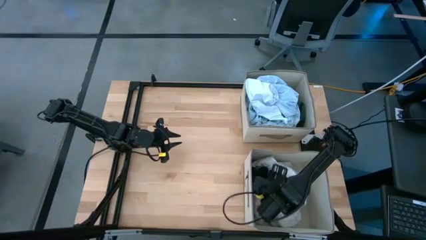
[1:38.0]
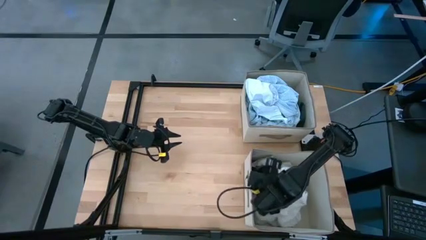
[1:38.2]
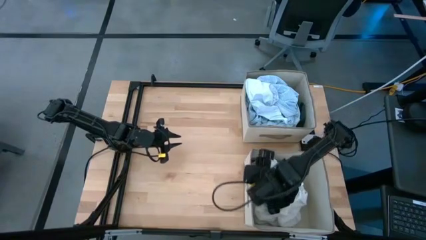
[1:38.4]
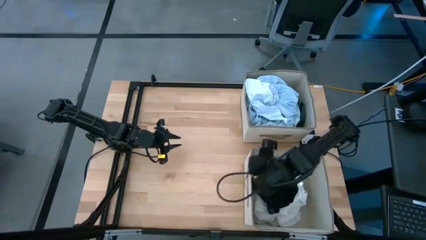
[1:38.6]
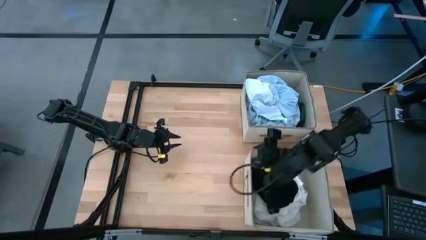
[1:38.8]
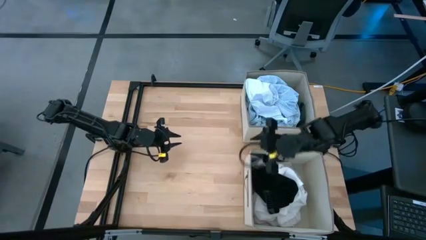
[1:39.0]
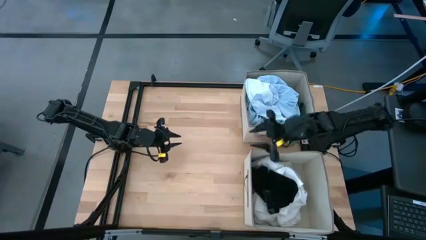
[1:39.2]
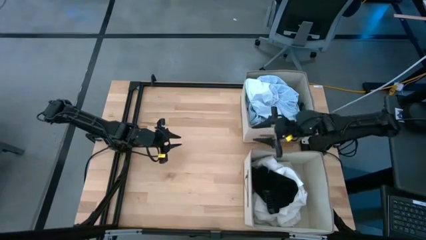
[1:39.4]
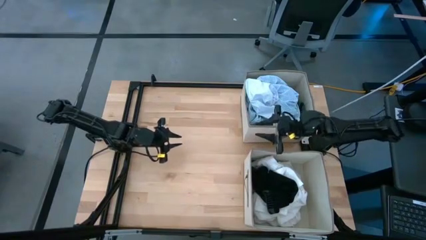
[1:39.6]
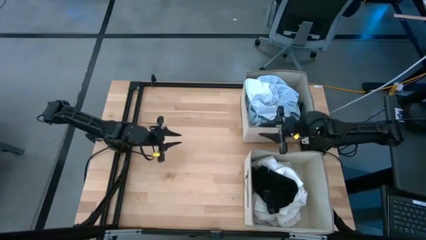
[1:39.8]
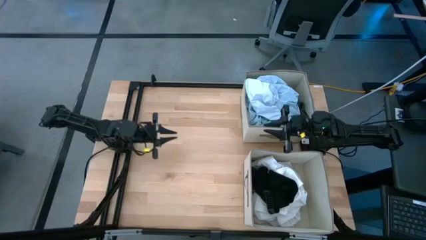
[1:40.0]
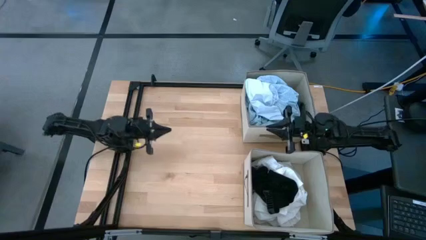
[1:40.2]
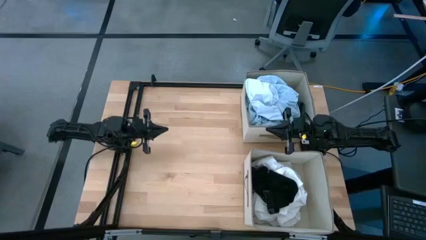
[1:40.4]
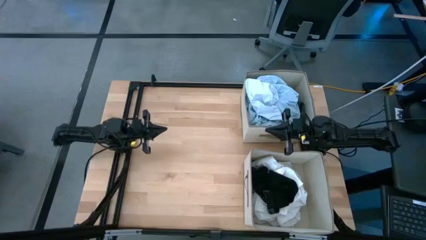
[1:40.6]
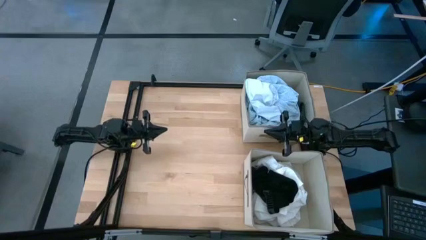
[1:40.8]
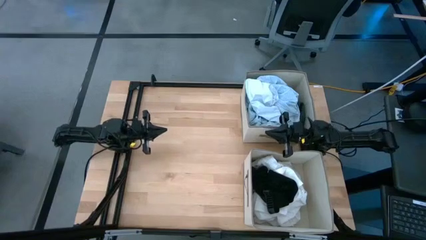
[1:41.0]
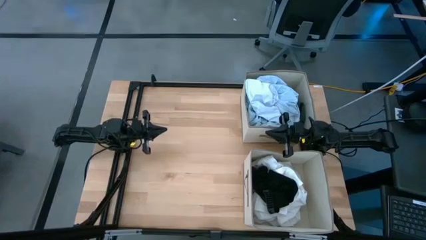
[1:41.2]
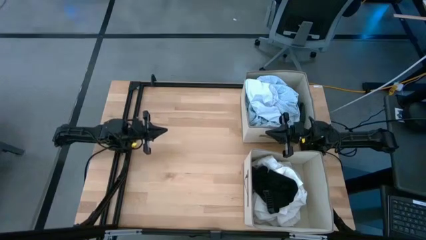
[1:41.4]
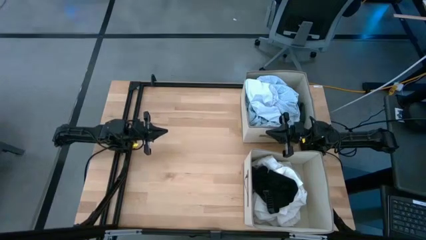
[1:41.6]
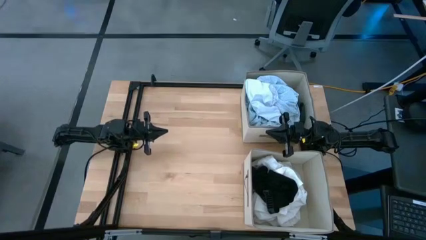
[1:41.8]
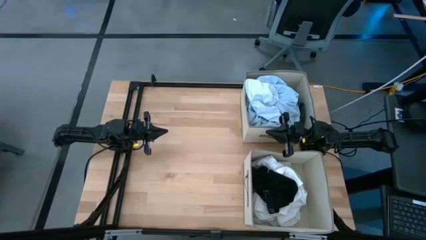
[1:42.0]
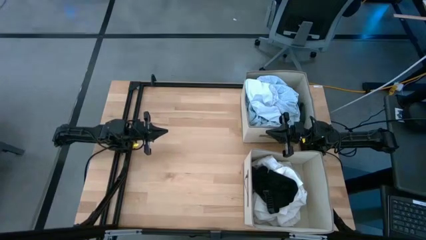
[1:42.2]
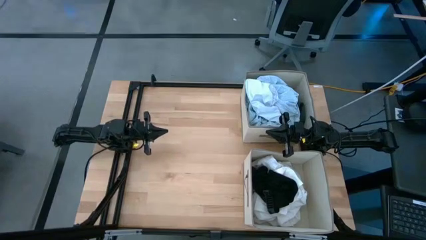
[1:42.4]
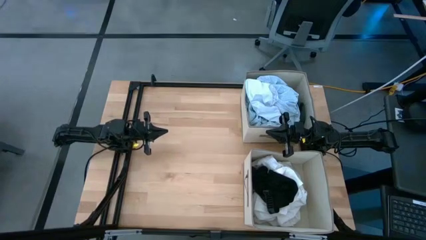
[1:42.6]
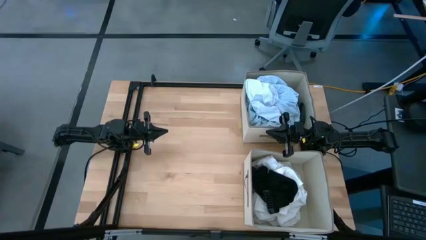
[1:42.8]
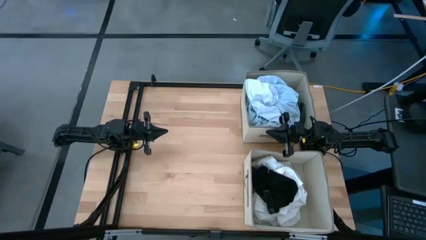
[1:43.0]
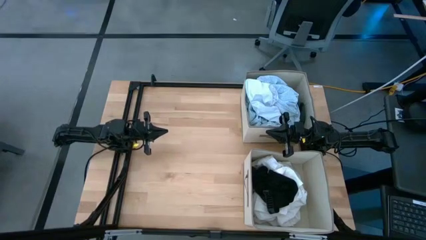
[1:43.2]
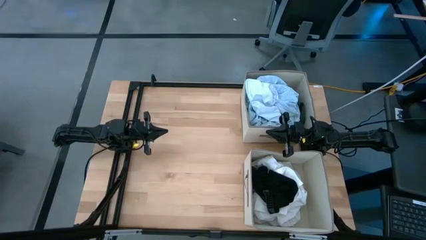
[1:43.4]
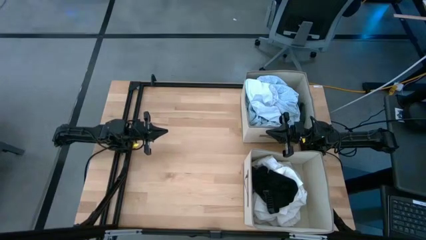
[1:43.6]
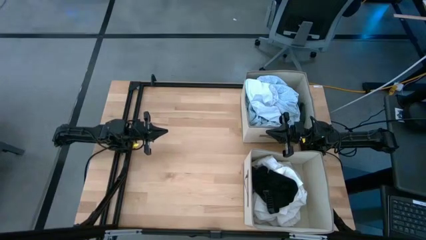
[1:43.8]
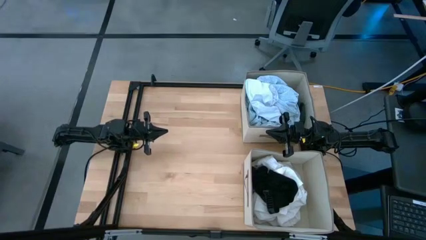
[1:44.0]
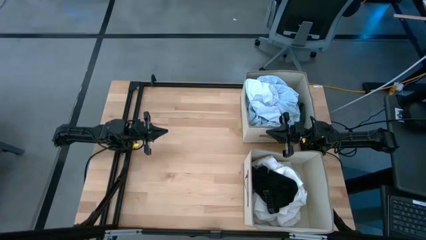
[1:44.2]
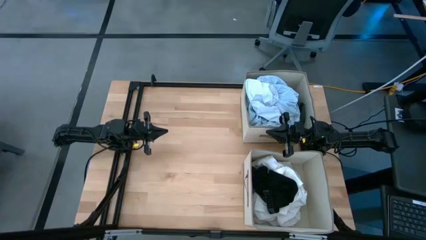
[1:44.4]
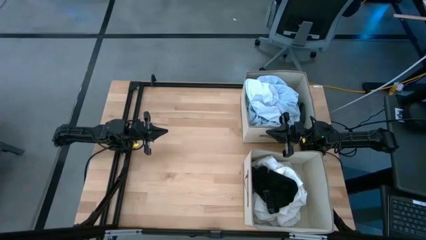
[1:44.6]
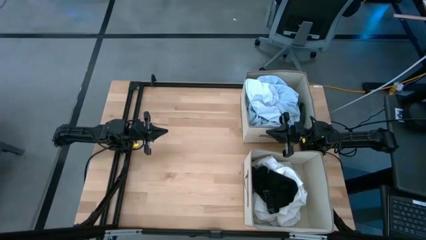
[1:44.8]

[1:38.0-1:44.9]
Task: Sort clothes
Return To Home Position

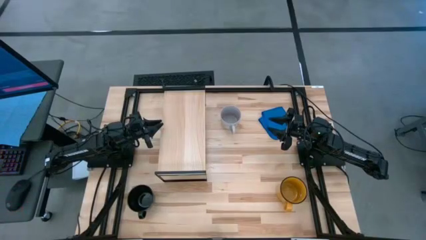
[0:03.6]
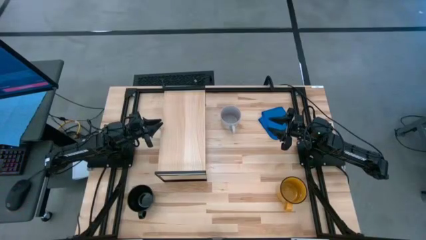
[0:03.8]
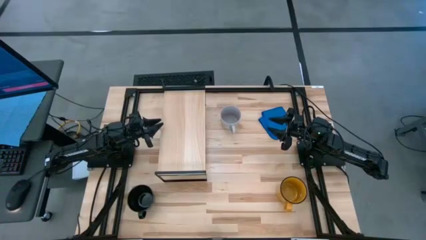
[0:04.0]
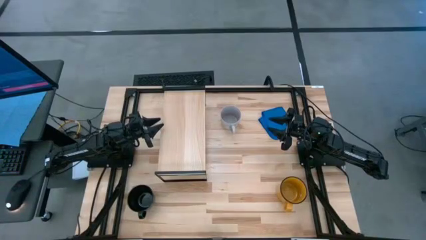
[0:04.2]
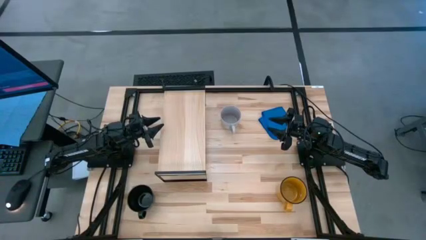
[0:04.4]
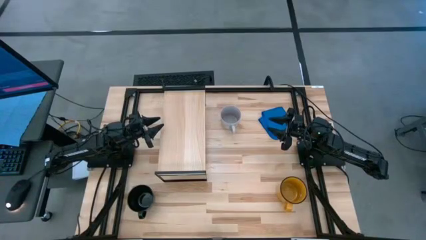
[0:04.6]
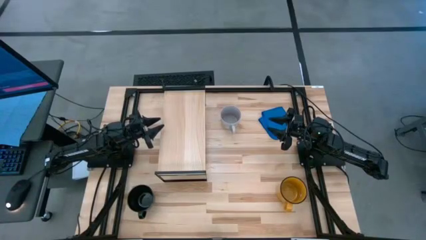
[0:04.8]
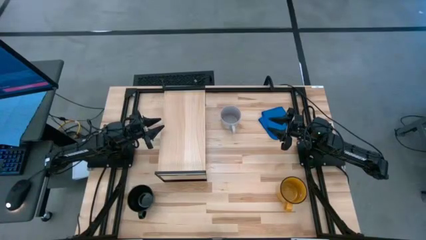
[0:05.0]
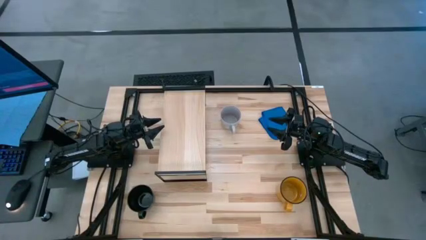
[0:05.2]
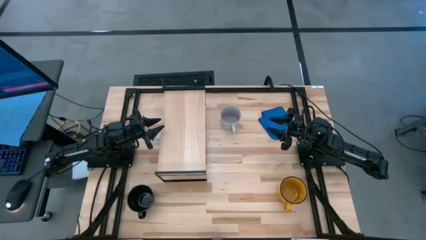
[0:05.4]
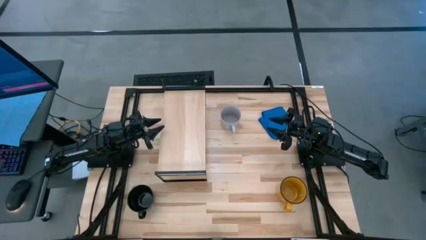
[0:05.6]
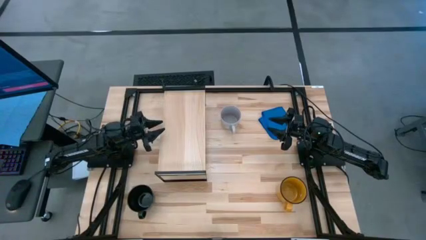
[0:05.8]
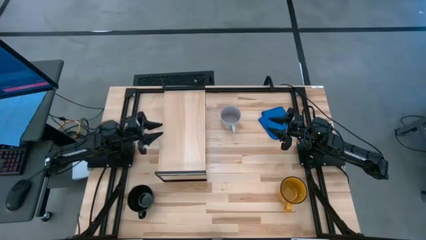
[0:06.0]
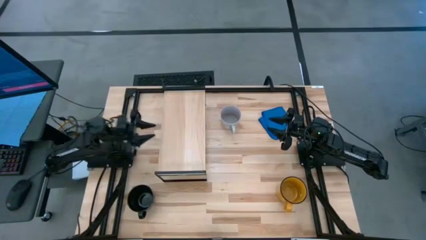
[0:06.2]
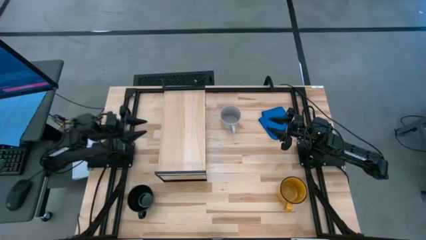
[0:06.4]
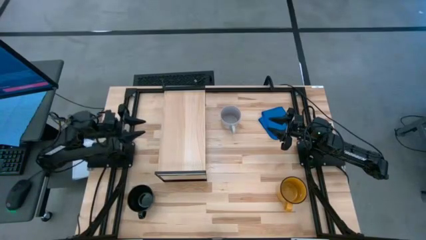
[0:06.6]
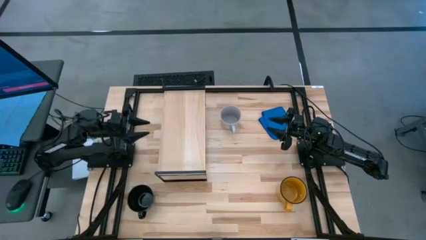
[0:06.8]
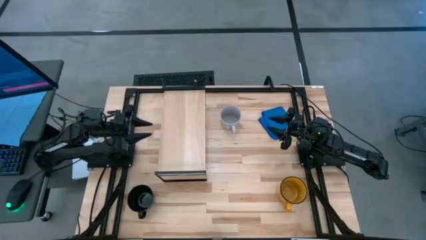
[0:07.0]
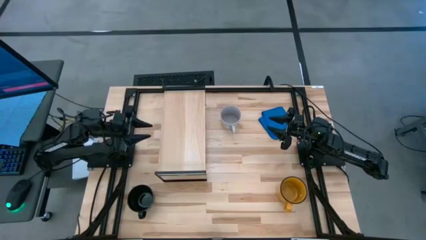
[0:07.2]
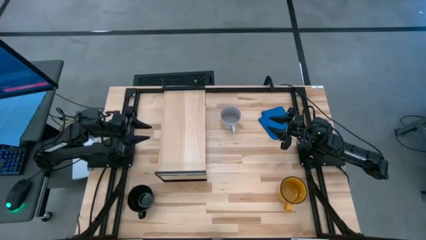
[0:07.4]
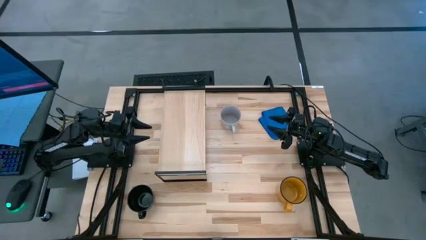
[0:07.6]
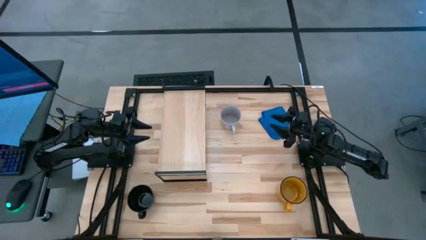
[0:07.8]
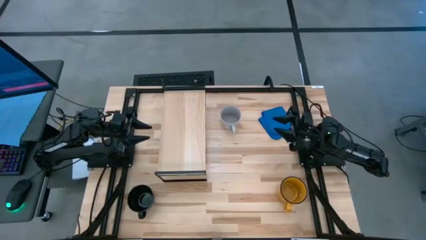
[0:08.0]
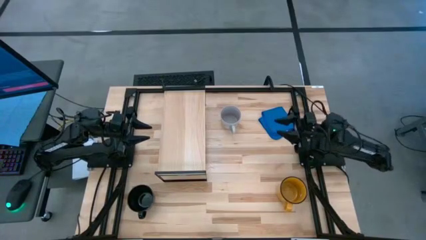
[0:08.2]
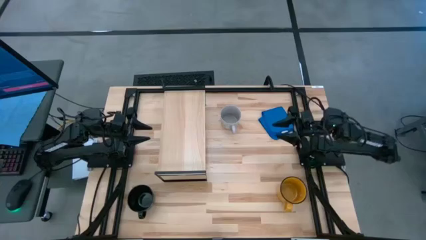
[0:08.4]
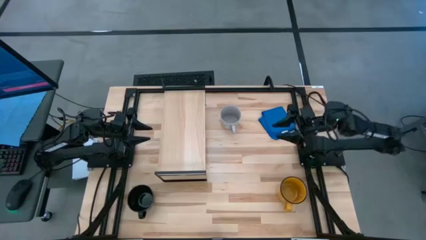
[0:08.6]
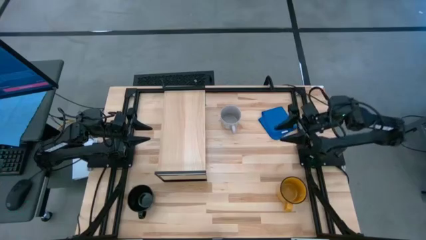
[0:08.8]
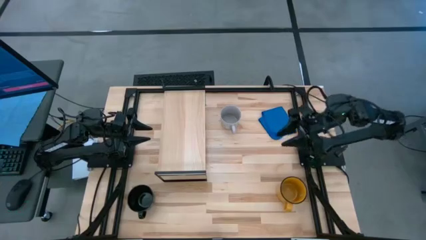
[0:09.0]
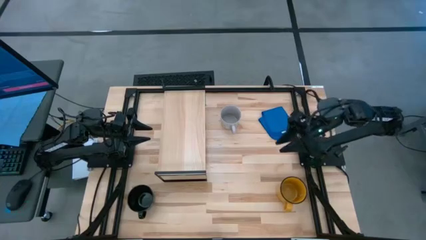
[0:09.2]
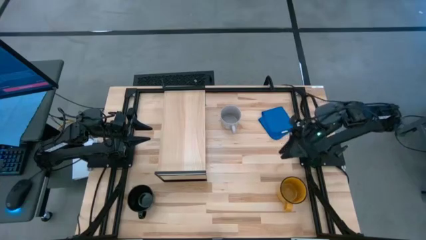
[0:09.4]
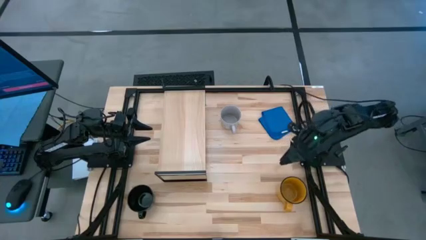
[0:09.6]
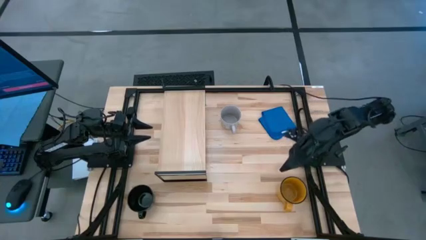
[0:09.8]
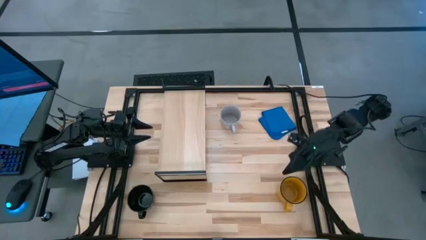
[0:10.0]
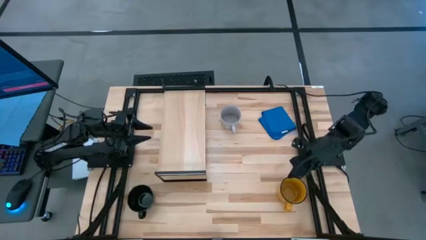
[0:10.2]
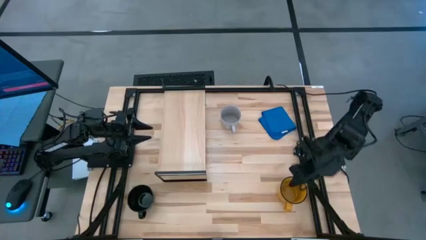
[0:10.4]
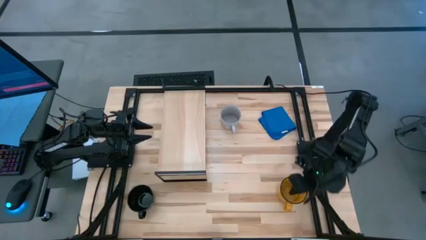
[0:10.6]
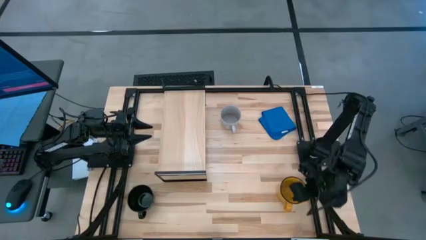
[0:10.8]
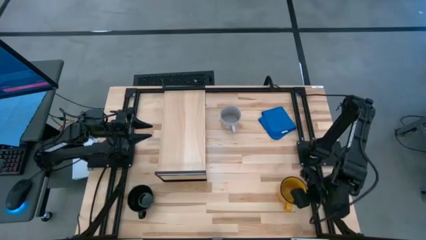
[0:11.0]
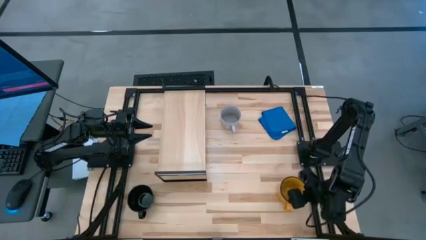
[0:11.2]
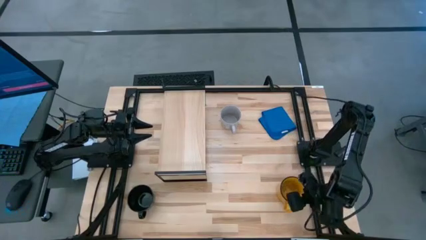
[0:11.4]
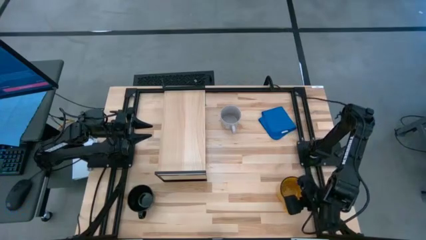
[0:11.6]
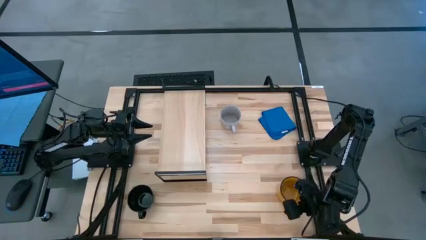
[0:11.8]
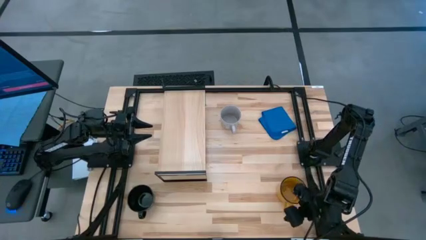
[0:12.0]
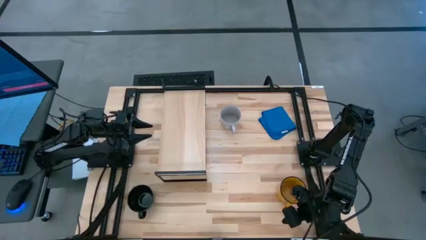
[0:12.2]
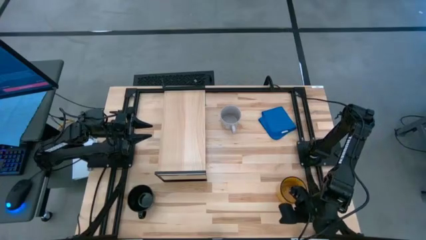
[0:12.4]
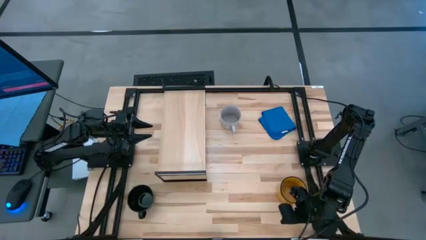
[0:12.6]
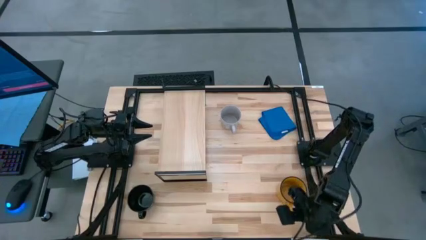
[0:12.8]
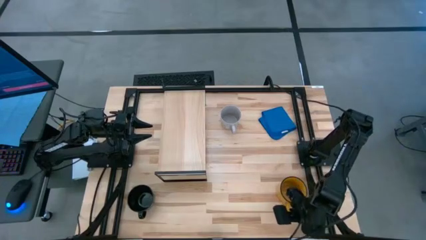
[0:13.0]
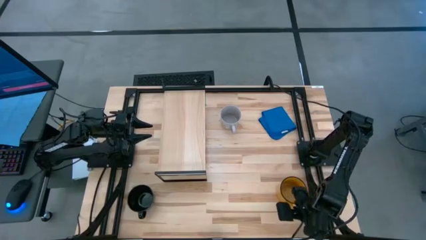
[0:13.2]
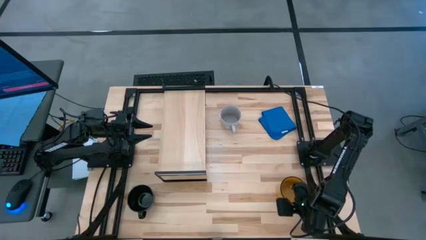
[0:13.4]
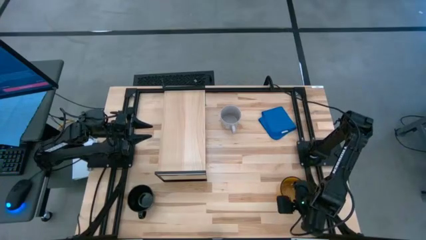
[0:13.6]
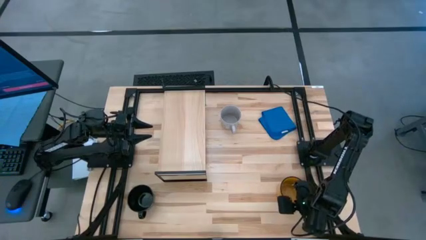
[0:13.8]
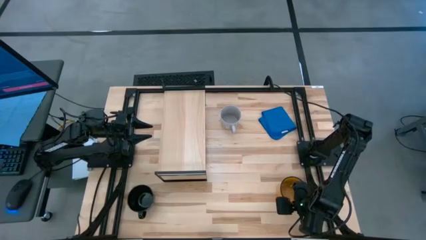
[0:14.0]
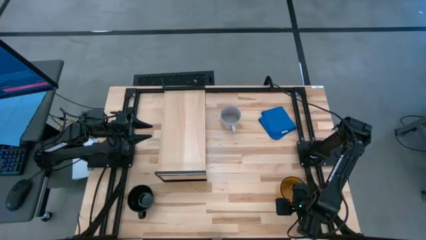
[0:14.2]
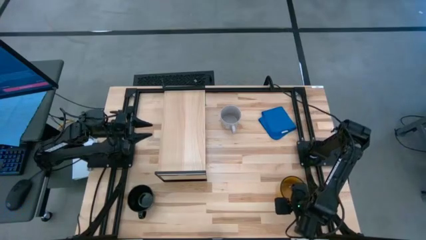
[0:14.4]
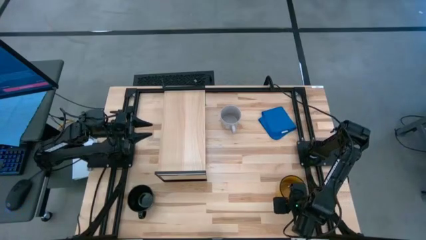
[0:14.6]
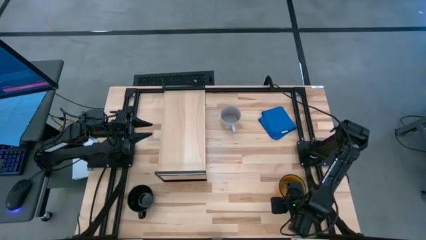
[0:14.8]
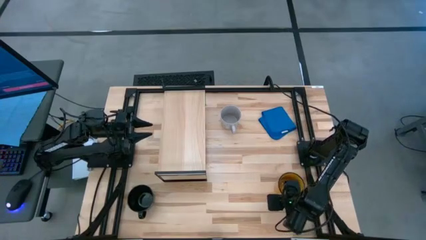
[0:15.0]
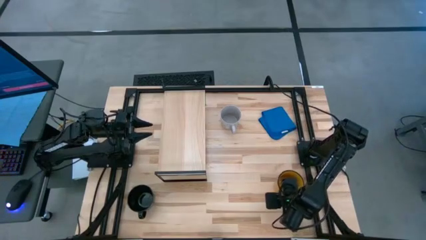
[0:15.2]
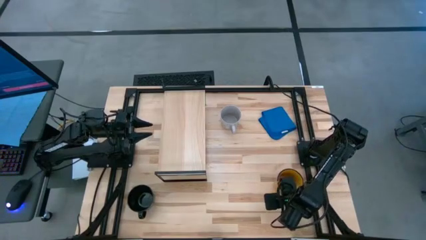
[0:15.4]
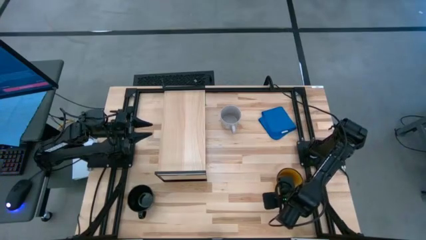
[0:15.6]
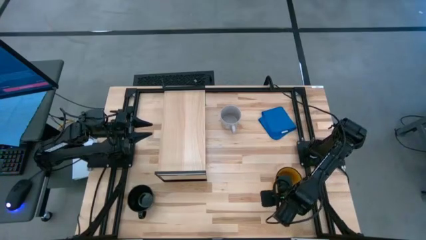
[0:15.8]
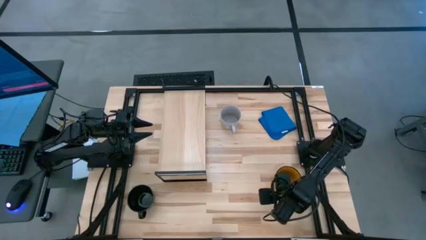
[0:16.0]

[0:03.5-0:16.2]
Task: Stack small to large cups/mugs on shelf
Put the yellow mug on the shelf
